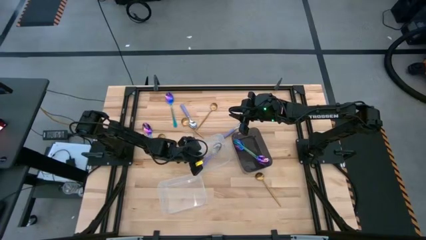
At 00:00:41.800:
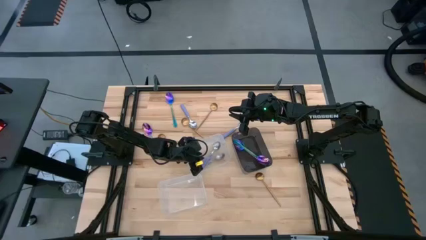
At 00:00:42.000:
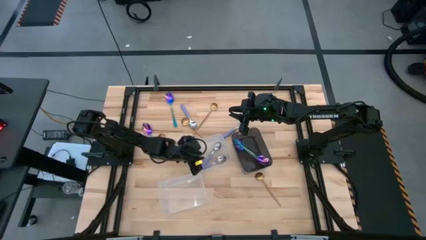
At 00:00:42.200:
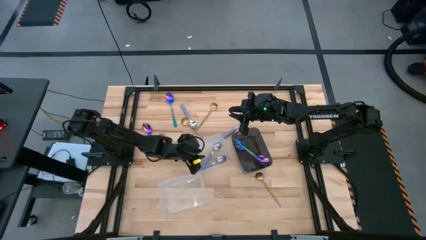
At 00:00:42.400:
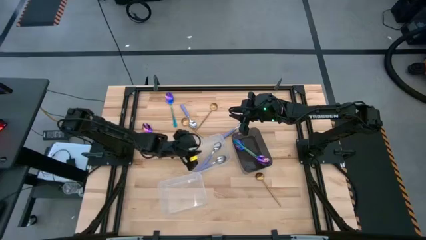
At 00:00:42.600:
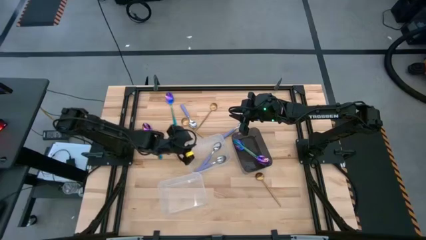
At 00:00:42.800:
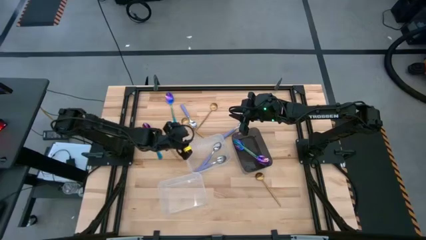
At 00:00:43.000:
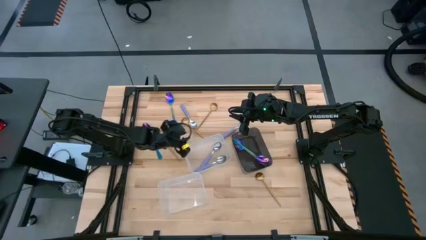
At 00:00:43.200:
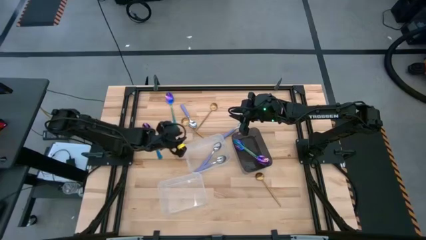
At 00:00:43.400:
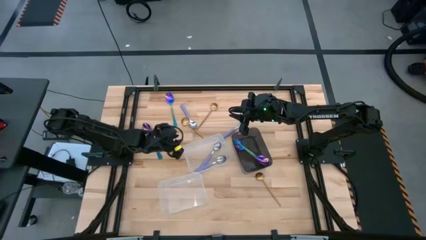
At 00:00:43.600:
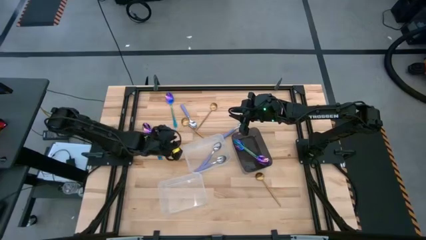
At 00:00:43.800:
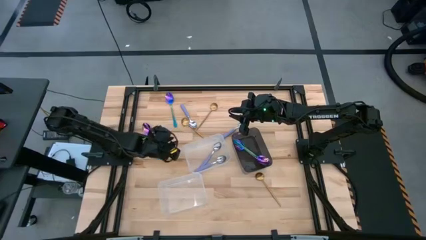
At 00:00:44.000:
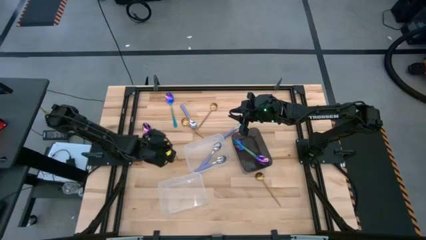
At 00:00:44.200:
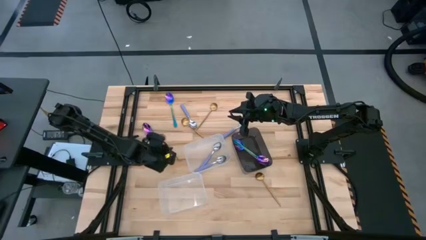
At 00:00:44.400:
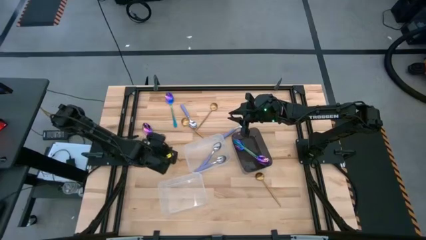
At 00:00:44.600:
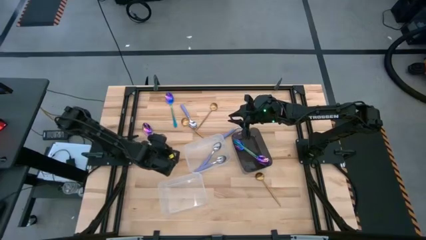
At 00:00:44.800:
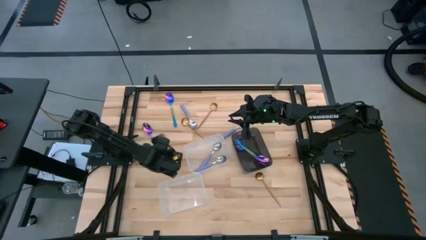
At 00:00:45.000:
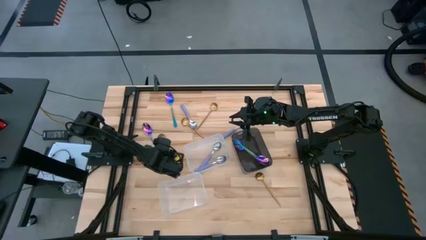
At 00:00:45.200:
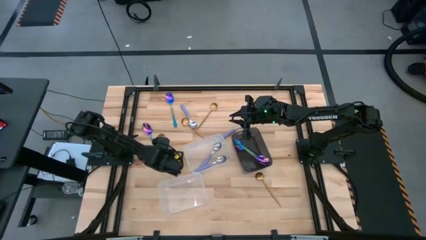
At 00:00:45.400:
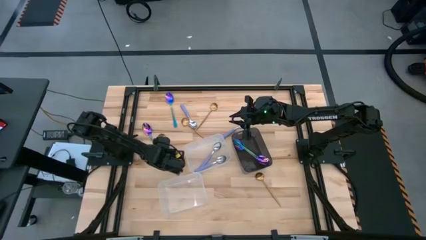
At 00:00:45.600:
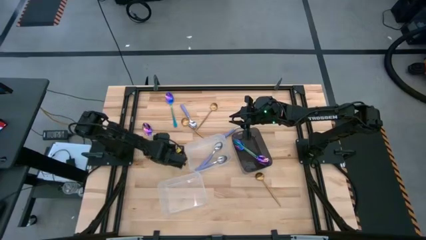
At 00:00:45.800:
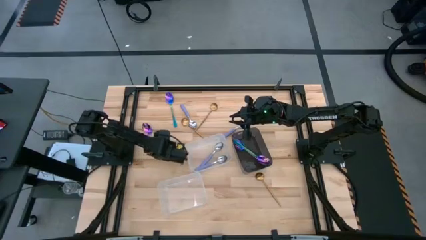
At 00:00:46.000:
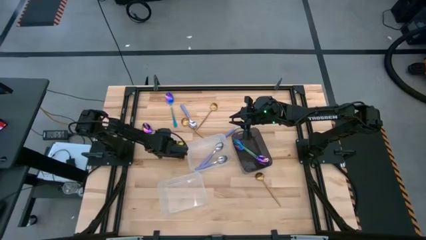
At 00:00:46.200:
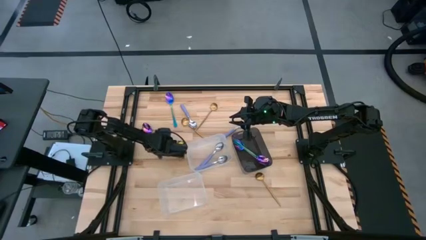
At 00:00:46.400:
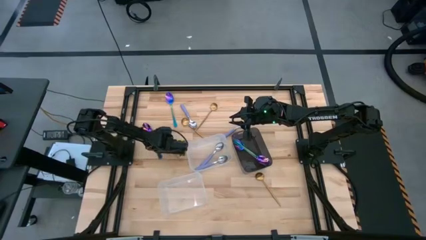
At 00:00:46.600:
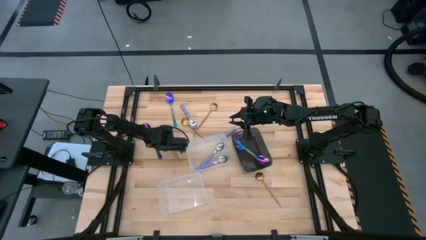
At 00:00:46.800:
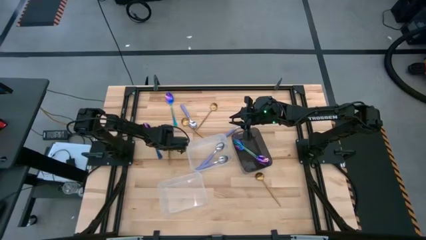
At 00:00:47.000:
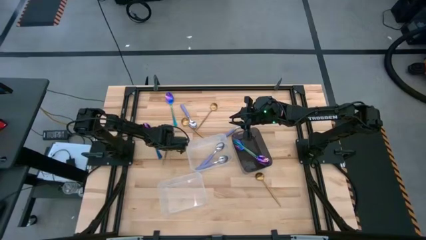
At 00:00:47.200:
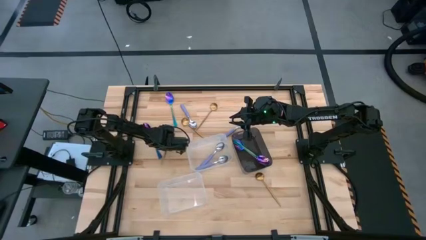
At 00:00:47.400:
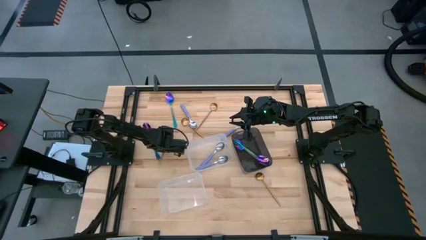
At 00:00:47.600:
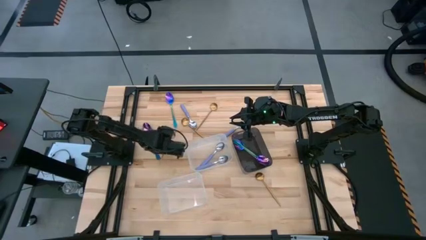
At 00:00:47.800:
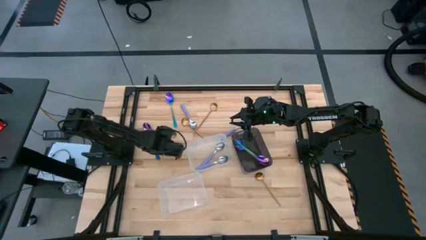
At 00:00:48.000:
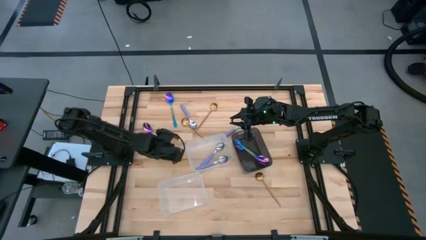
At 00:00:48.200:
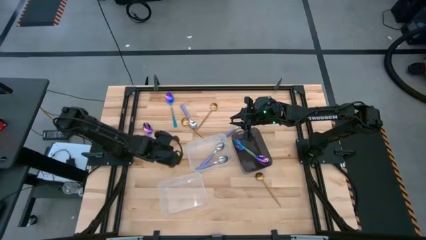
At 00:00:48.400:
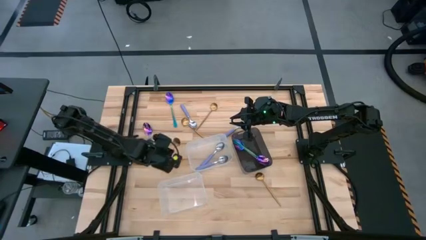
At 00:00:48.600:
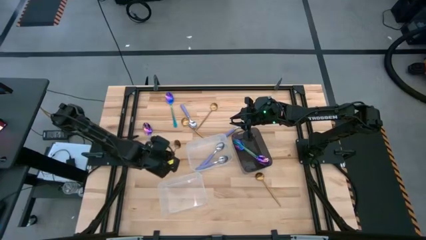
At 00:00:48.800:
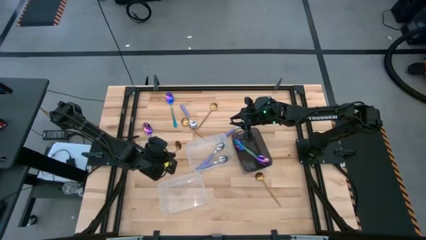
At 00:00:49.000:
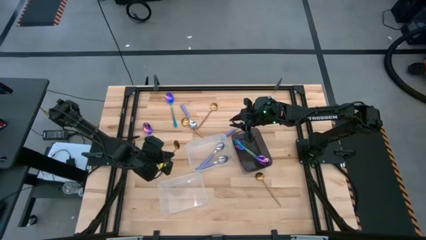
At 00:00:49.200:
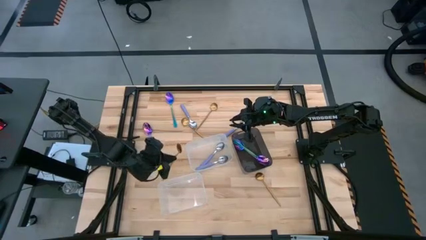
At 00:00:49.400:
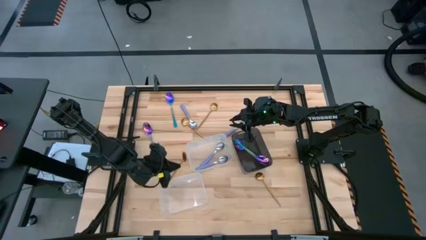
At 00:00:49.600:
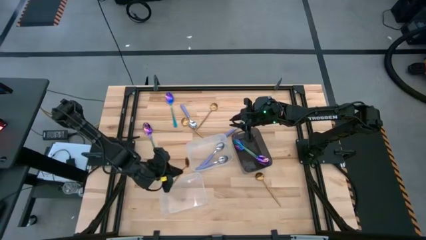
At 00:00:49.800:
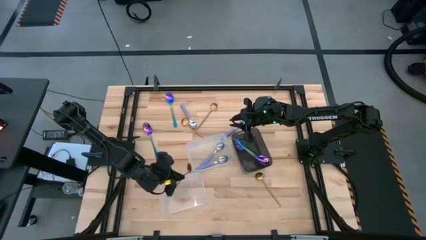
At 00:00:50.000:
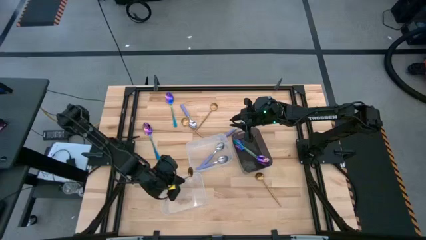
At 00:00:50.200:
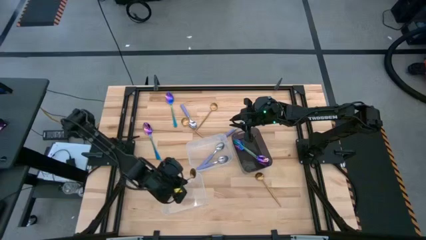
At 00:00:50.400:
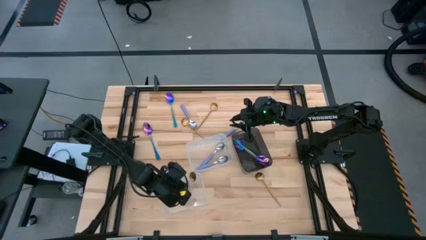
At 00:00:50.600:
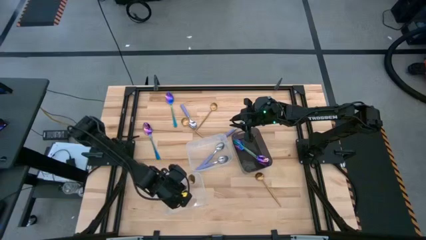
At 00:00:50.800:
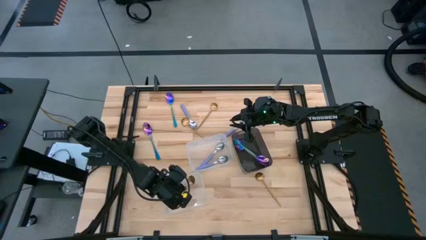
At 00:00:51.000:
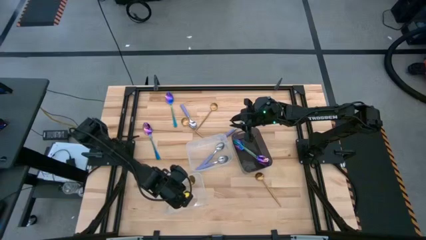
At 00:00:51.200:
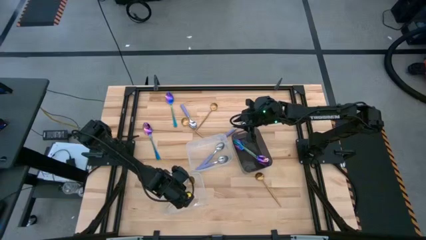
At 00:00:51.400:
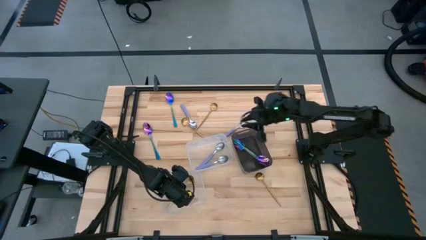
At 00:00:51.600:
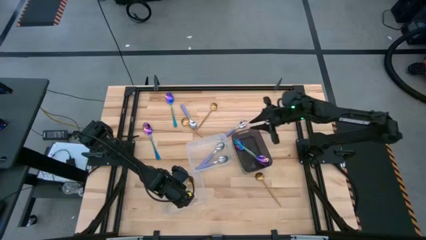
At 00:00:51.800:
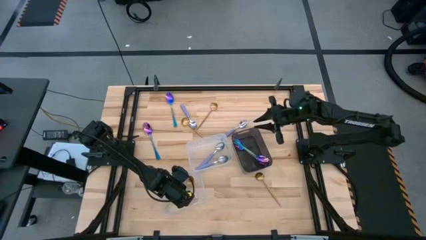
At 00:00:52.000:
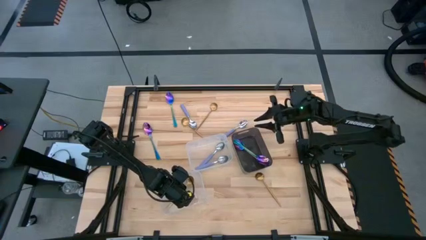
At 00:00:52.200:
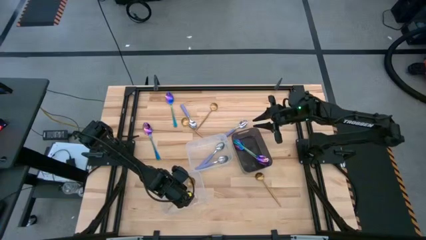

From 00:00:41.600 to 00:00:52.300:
Task: Sort silverware by color (type)
Put the gold spoon into the bottom transparent bin
